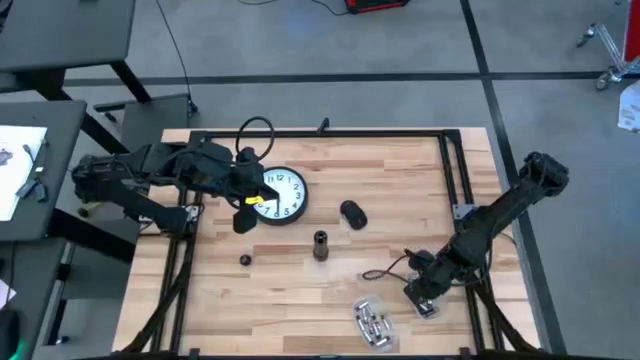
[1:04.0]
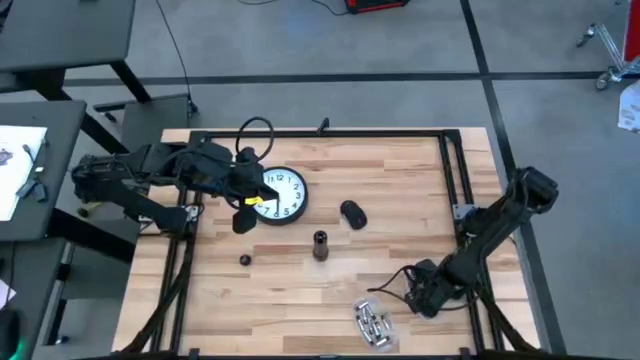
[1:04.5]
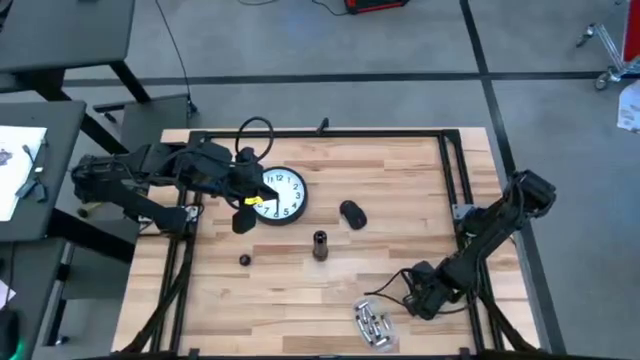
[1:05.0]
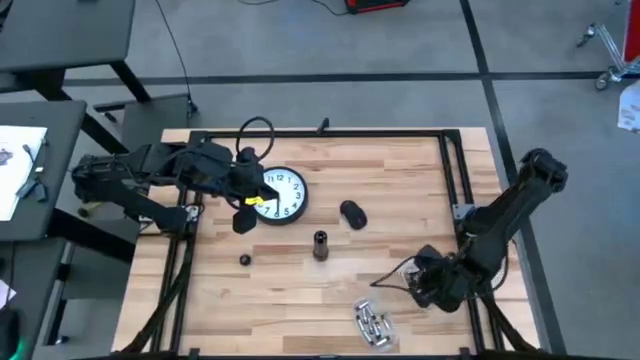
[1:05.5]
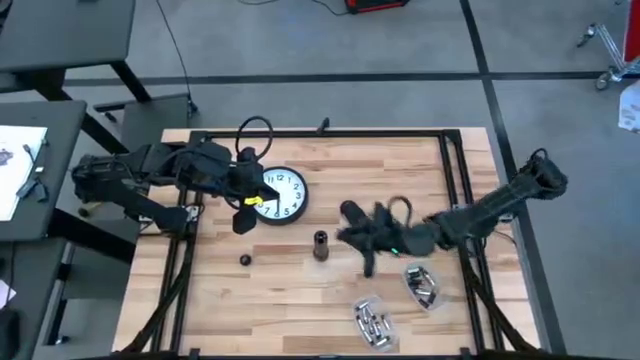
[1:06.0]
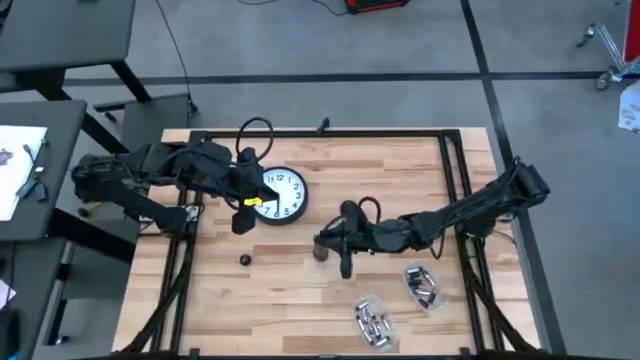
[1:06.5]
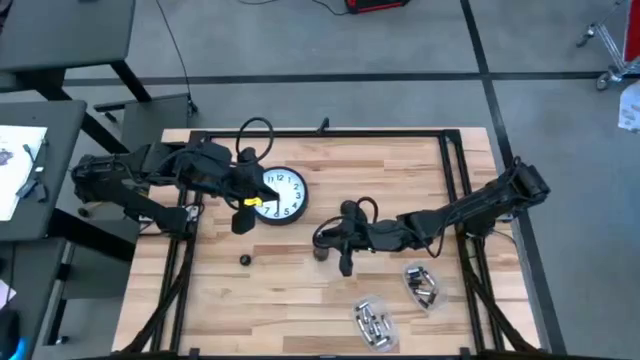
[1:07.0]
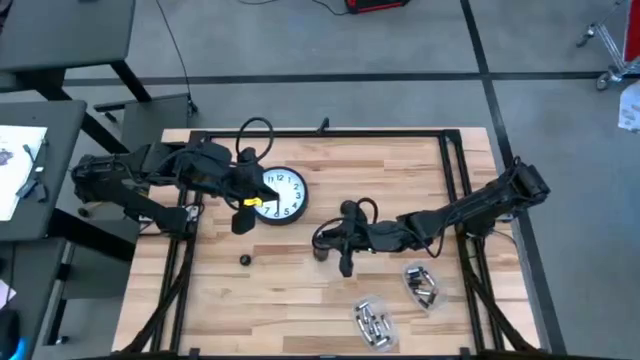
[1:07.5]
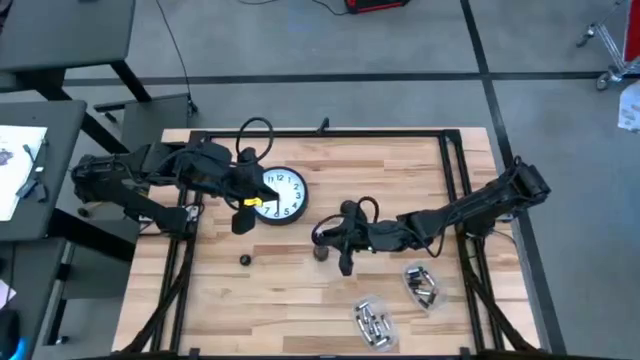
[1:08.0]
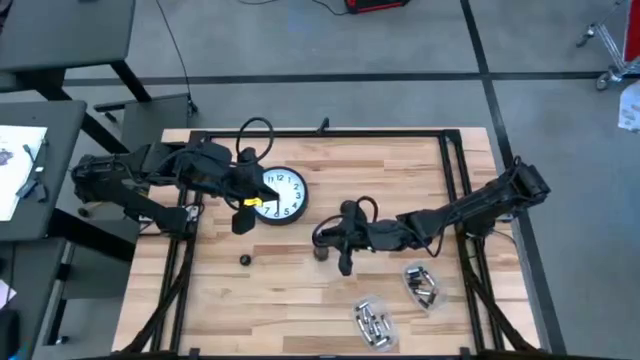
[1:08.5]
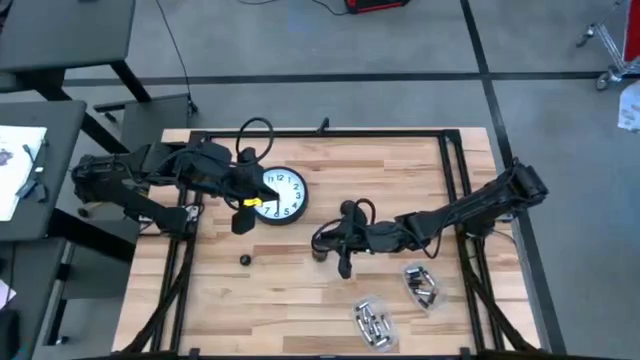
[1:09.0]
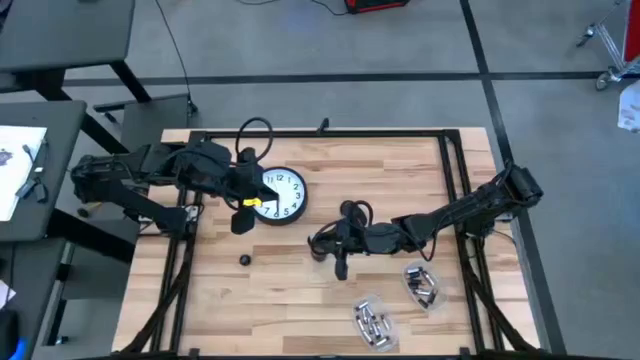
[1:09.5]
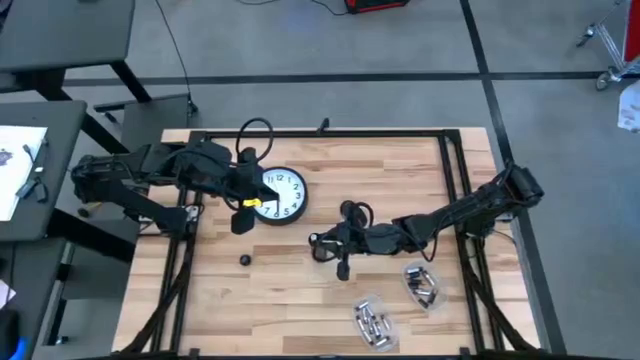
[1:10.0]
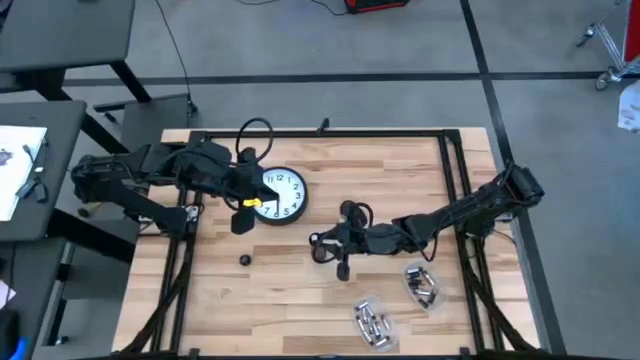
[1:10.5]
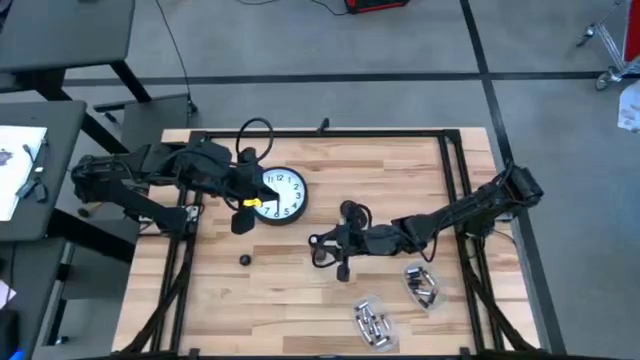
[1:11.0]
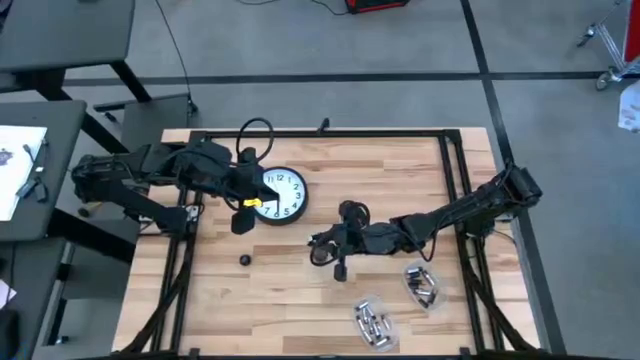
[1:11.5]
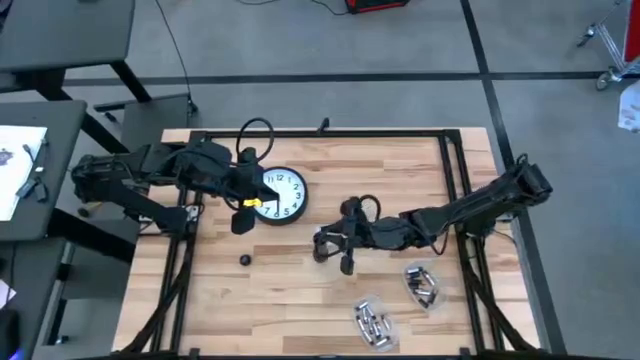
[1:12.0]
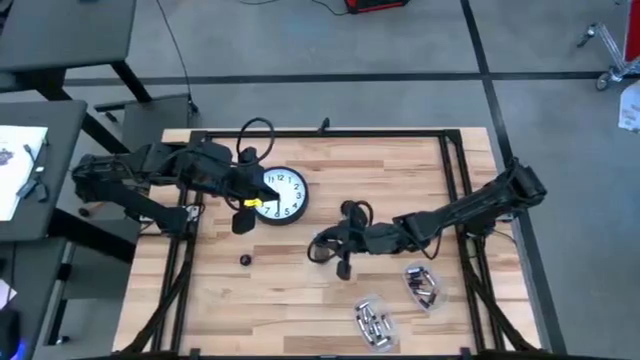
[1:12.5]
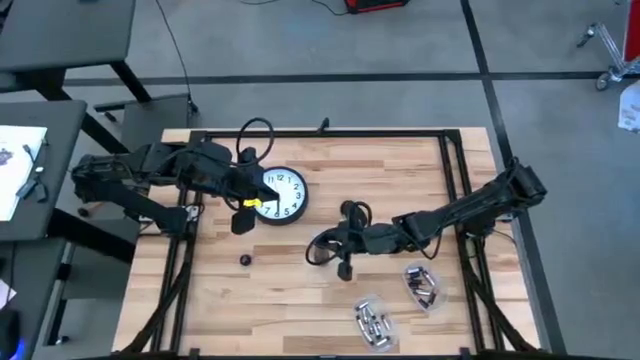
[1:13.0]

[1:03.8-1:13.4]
Task: Insert battery
Insert the silver battery into the black flashlight battery compartment

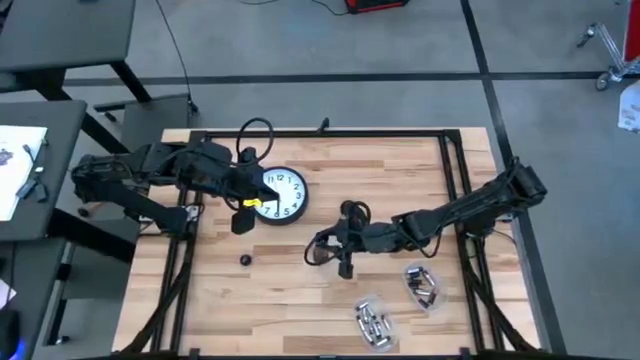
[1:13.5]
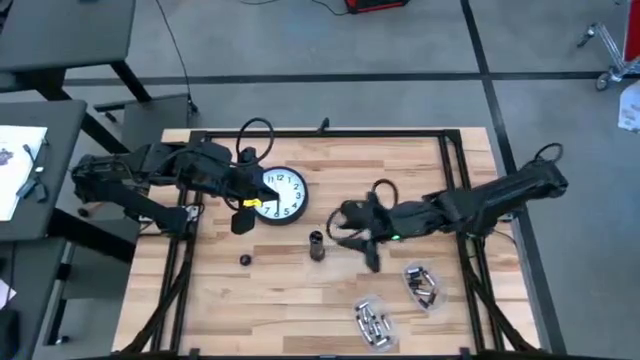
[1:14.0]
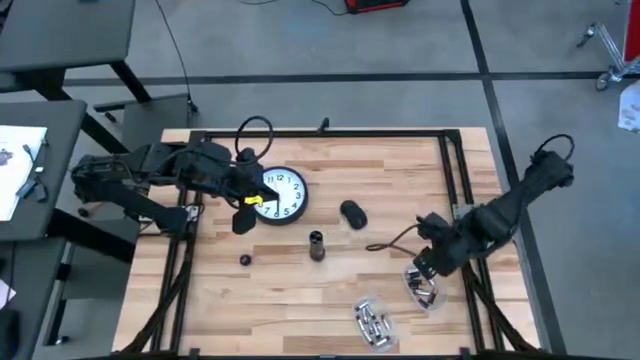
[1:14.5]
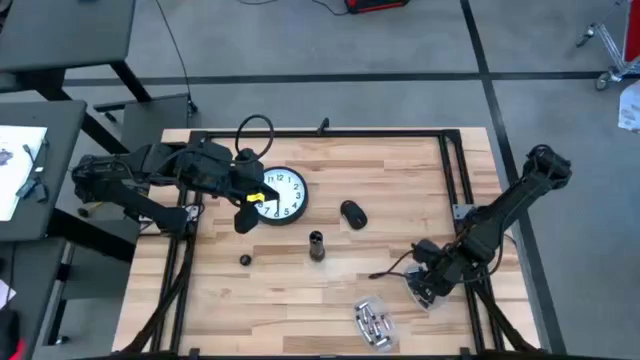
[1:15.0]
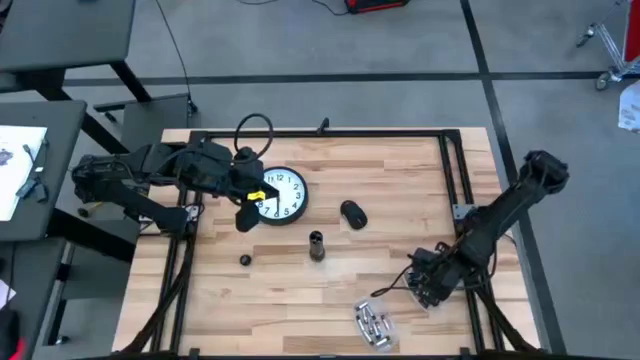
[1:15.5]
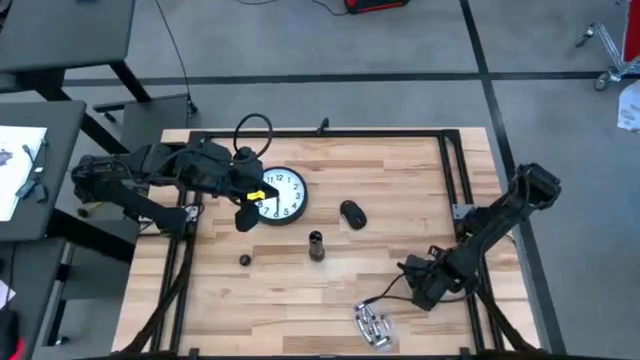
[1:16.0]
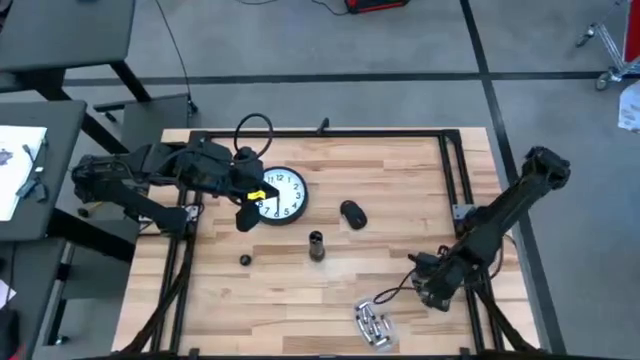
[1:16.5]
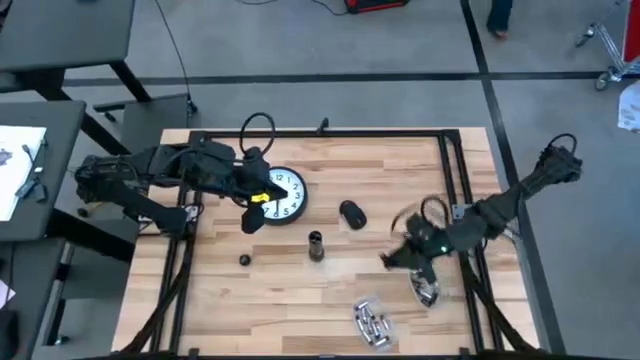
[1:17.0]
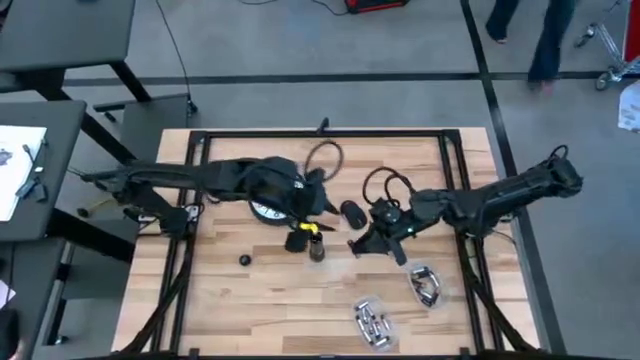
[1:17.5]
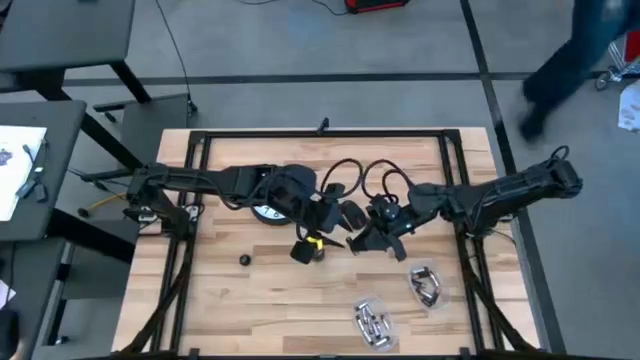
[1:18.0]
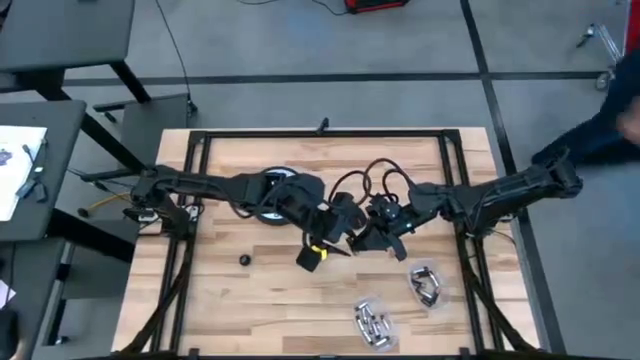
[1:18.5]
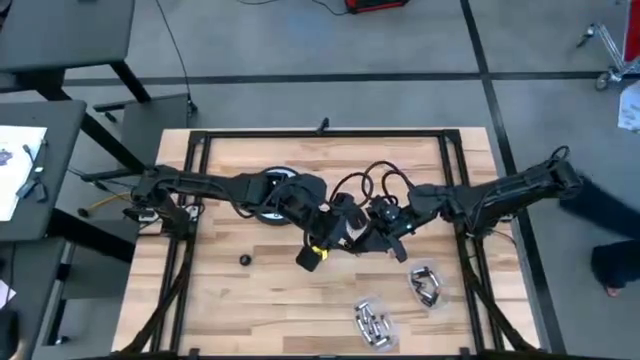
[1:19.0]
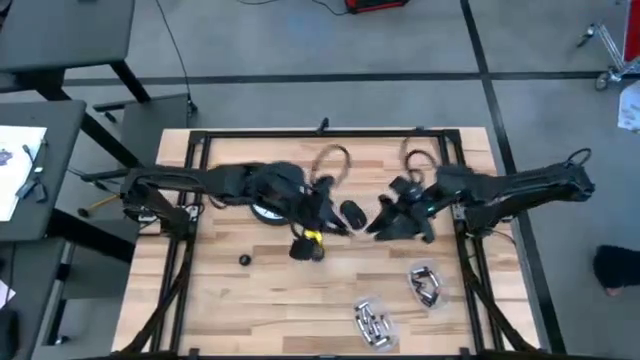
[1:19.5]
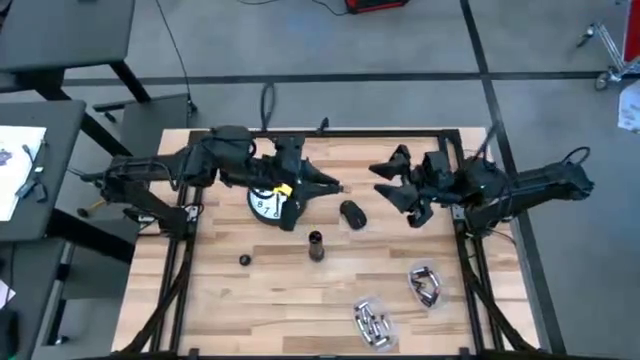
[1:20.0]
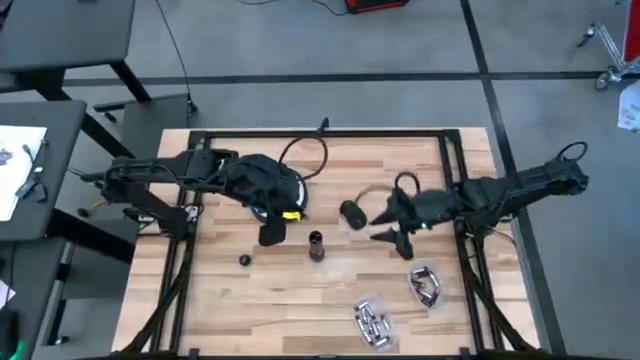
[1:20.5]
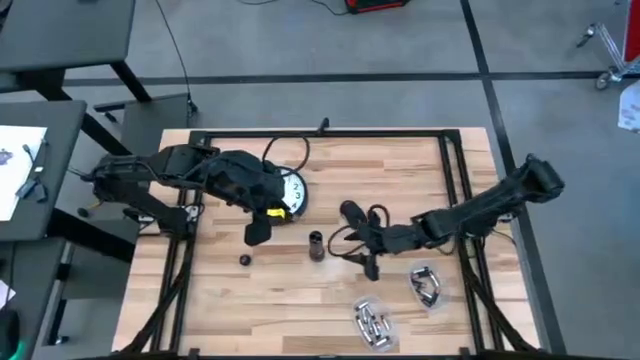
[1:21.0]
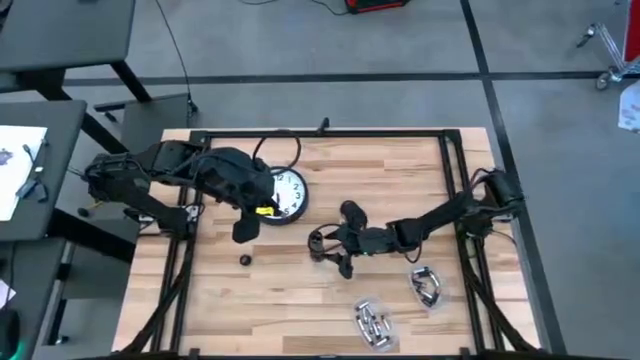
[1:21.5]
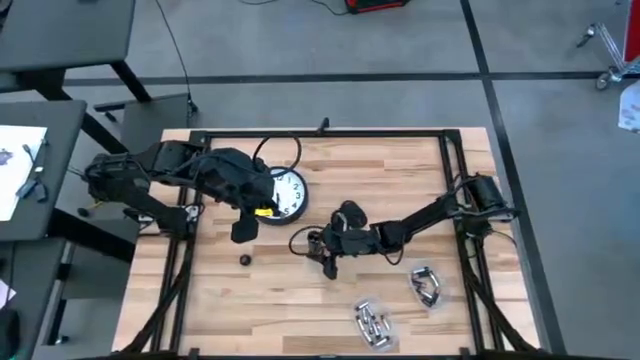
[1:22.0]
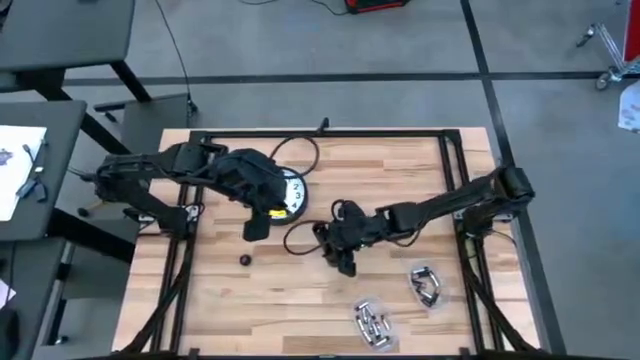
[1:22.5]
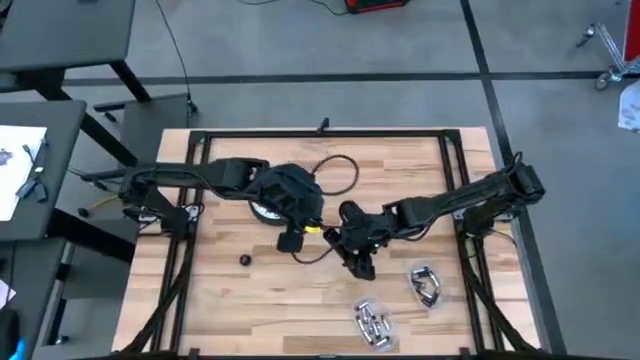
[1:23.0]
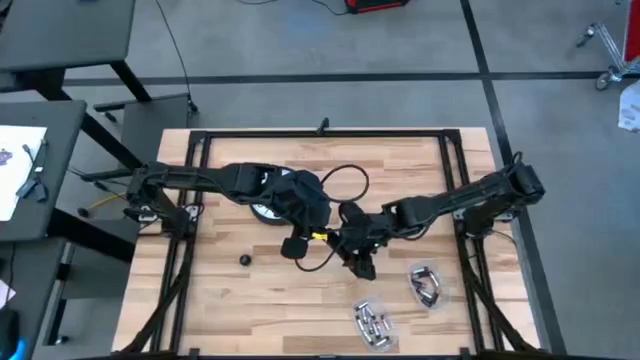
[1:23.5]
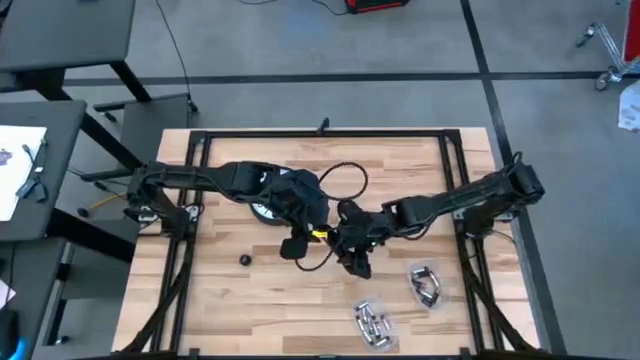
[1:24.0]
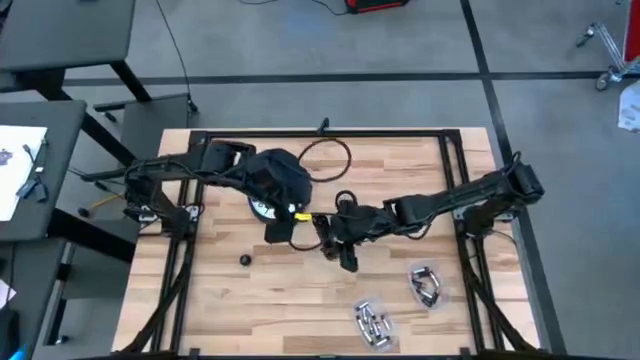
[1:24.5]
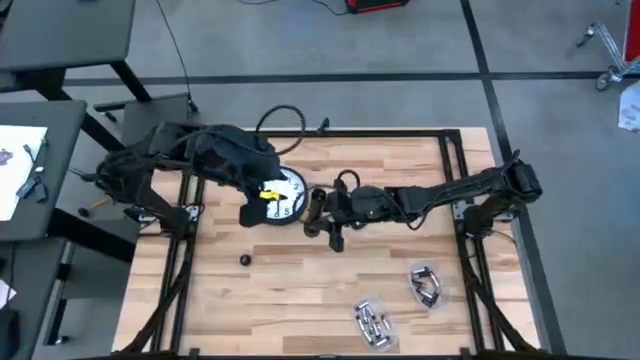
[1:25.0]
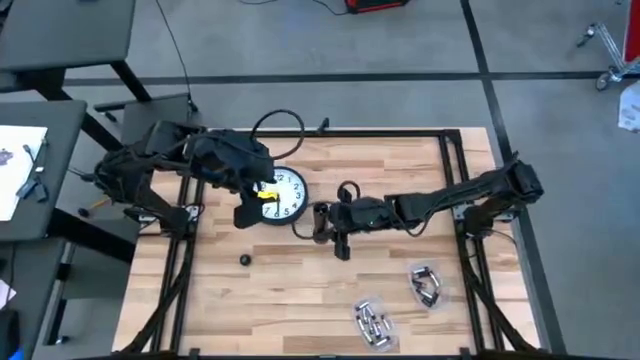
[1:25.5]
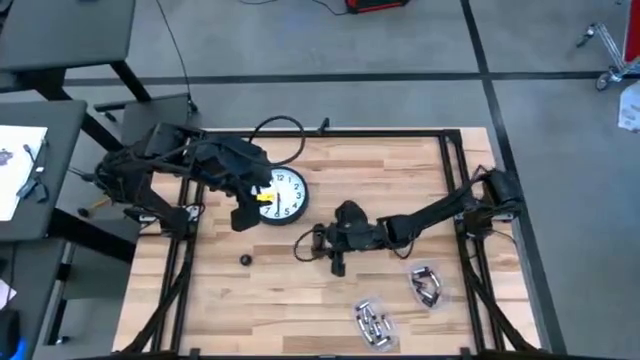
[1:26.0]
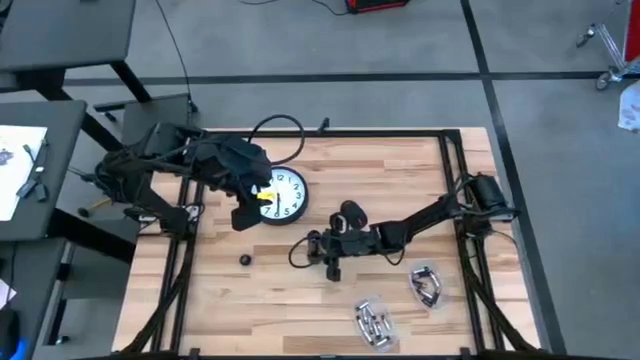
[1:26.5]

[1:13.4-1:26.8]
Insert the brown battery into the black flashlight battery compartment
